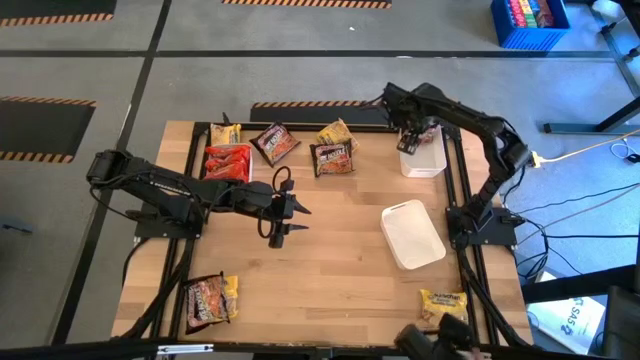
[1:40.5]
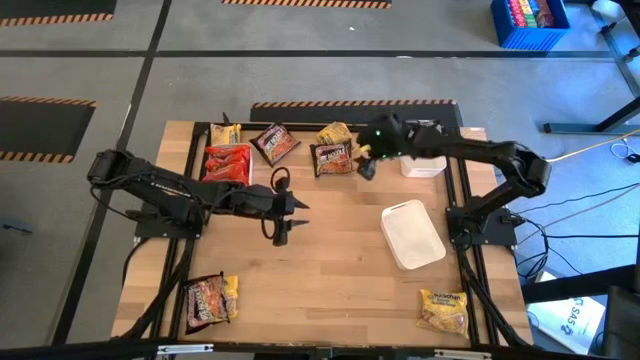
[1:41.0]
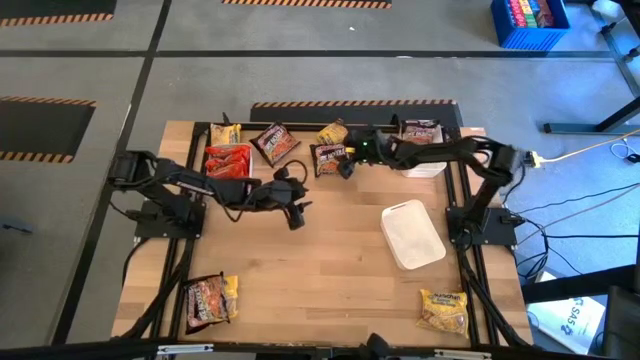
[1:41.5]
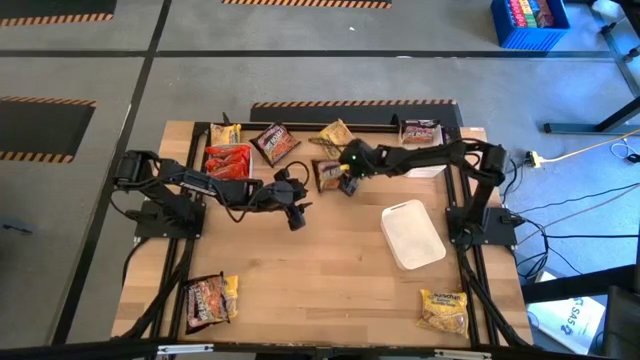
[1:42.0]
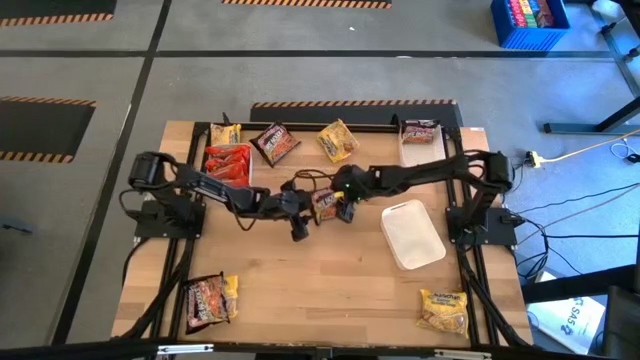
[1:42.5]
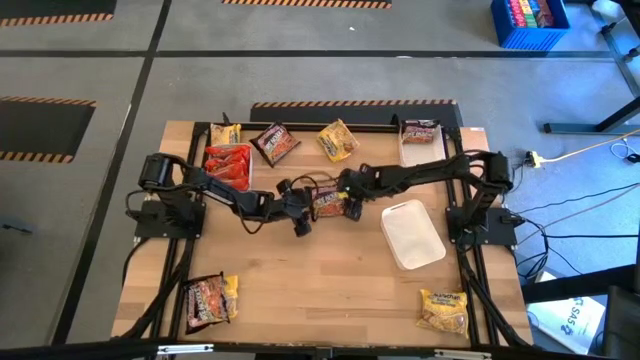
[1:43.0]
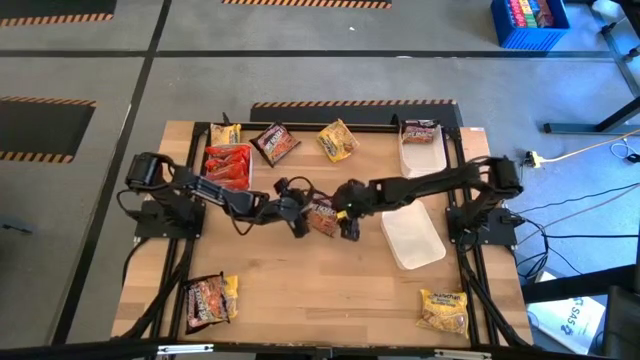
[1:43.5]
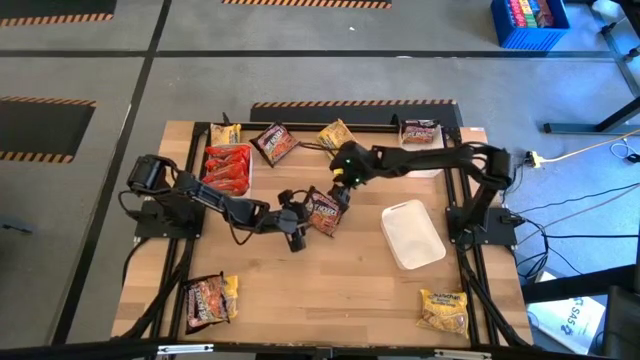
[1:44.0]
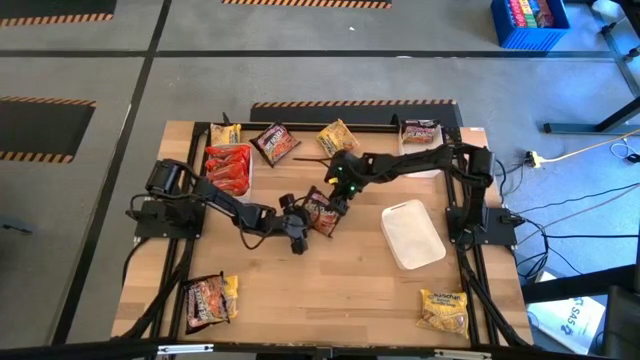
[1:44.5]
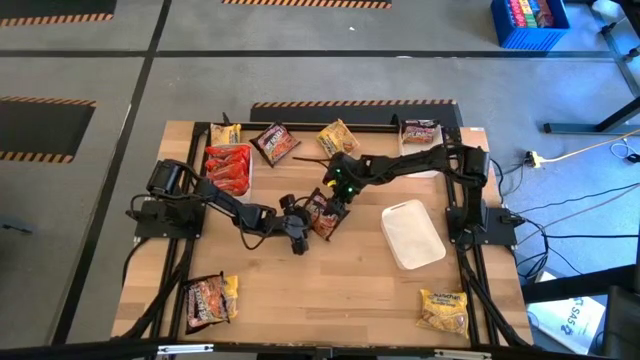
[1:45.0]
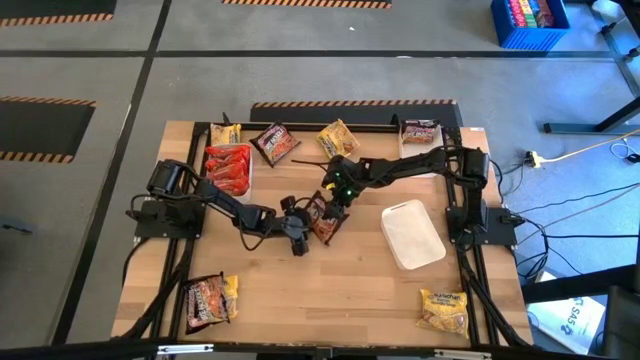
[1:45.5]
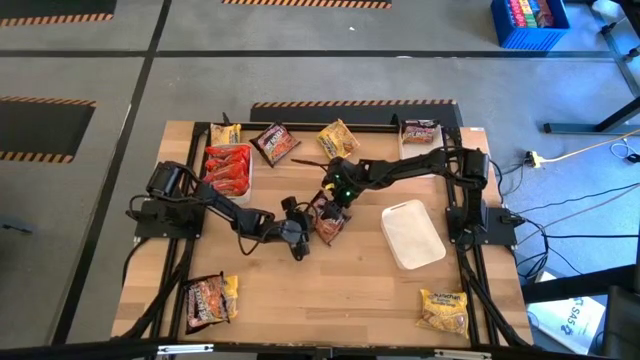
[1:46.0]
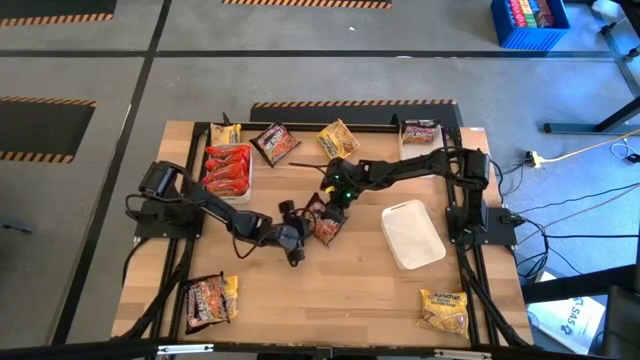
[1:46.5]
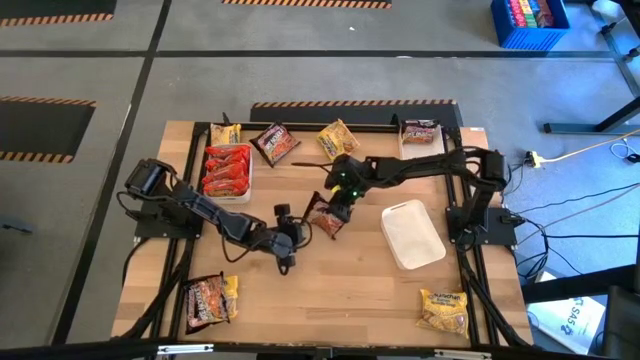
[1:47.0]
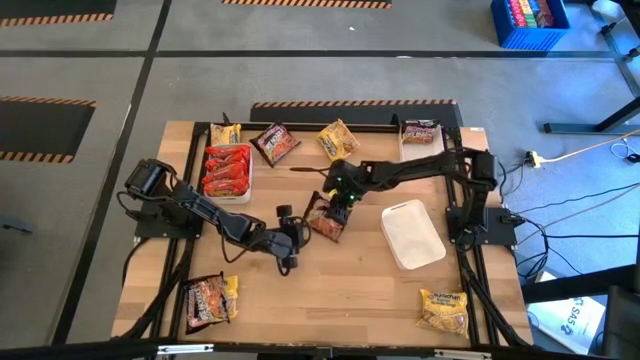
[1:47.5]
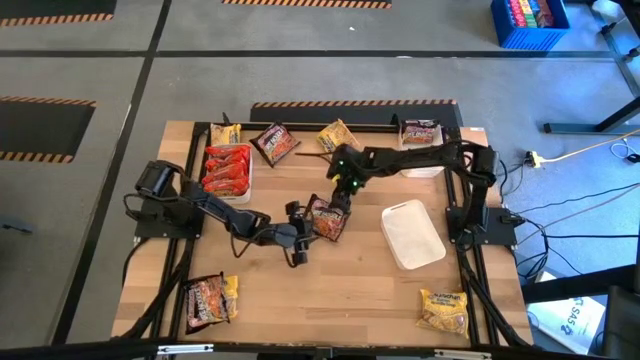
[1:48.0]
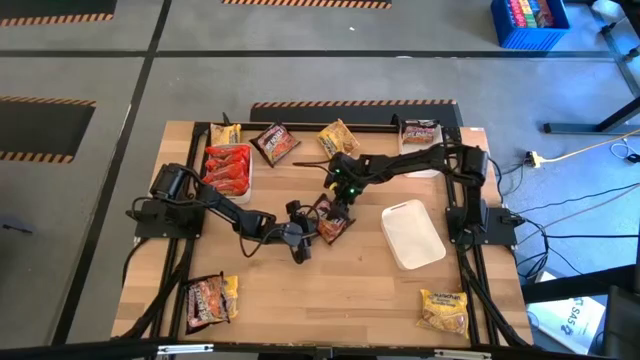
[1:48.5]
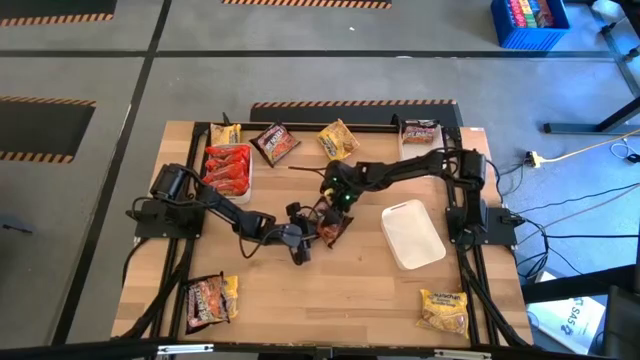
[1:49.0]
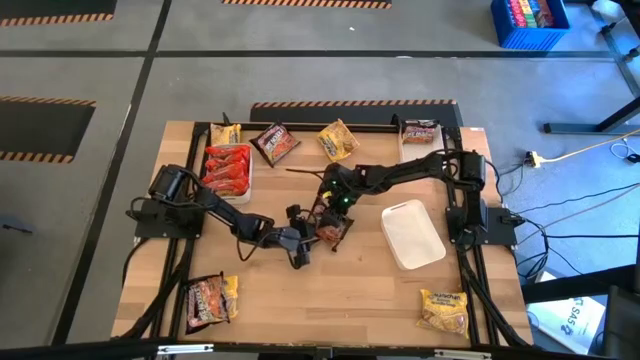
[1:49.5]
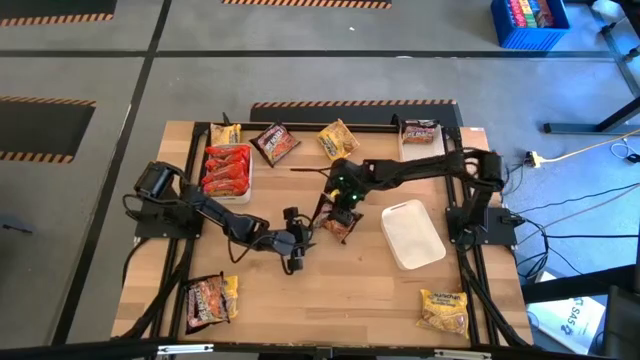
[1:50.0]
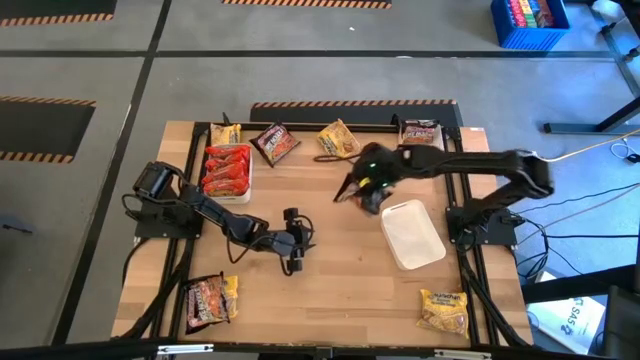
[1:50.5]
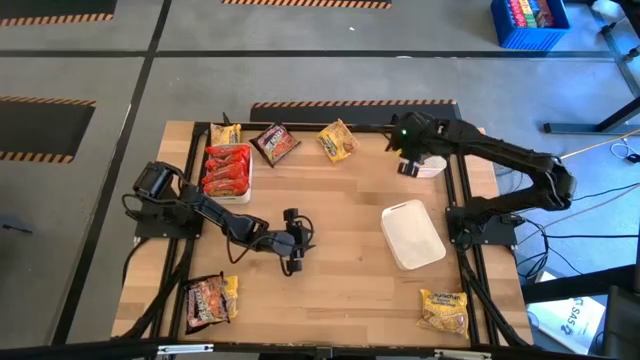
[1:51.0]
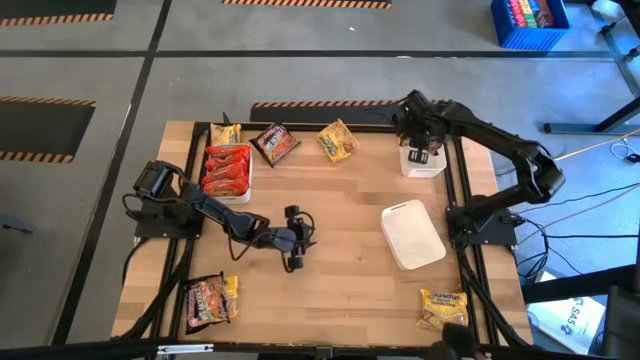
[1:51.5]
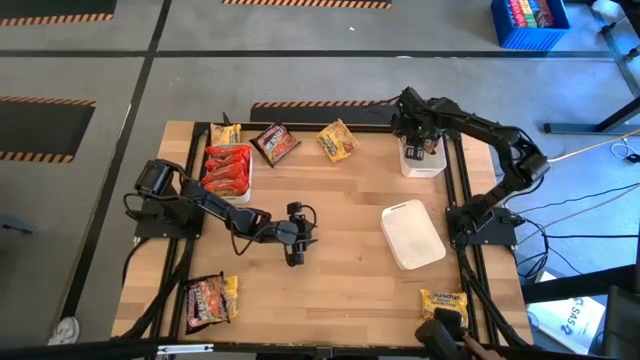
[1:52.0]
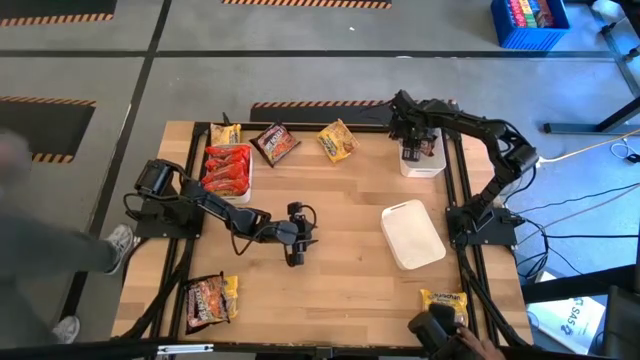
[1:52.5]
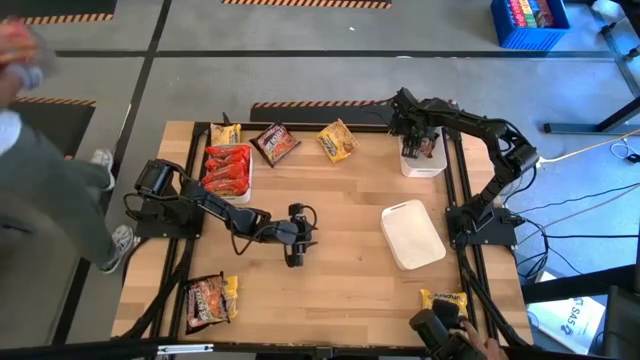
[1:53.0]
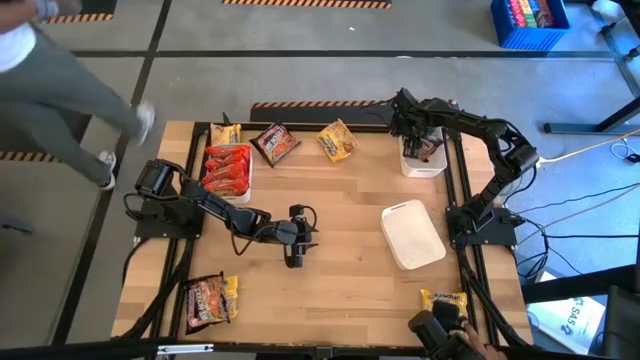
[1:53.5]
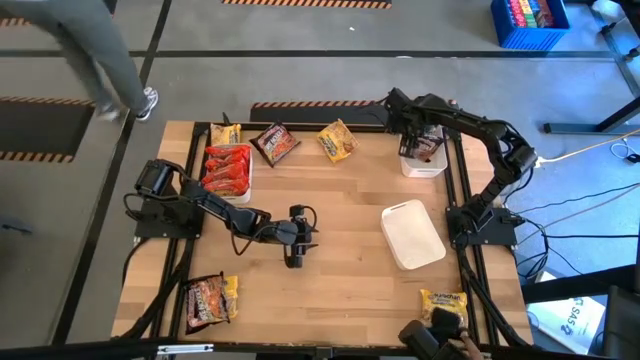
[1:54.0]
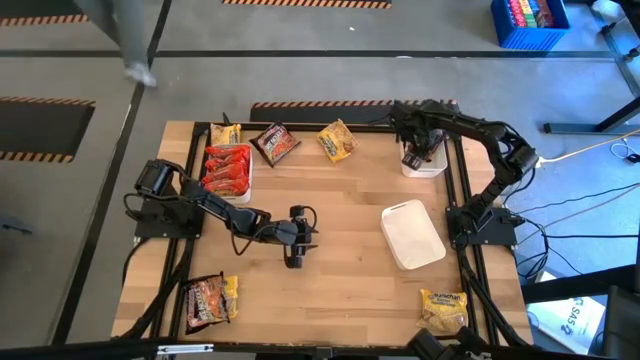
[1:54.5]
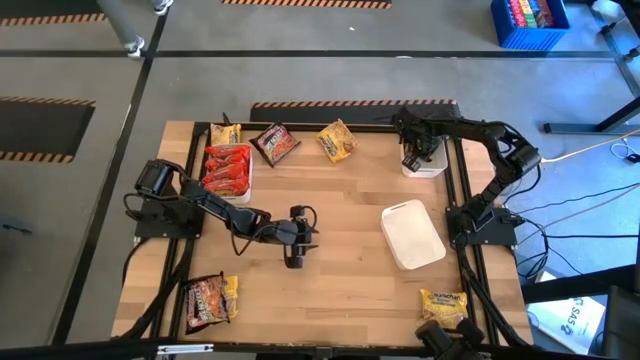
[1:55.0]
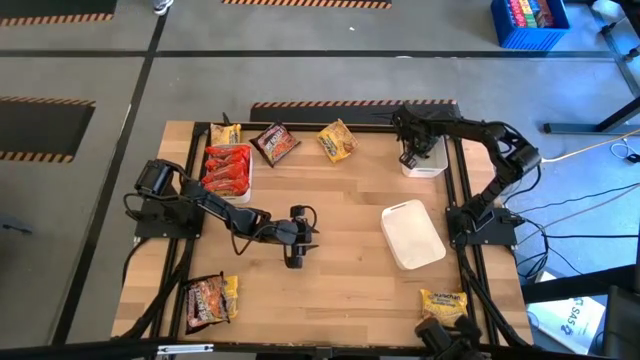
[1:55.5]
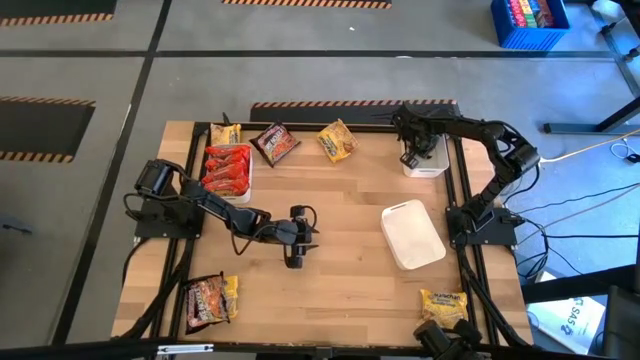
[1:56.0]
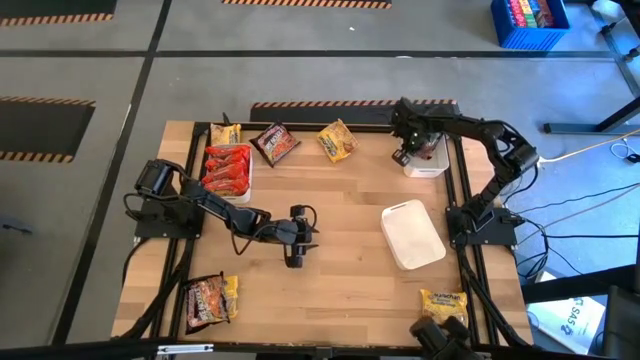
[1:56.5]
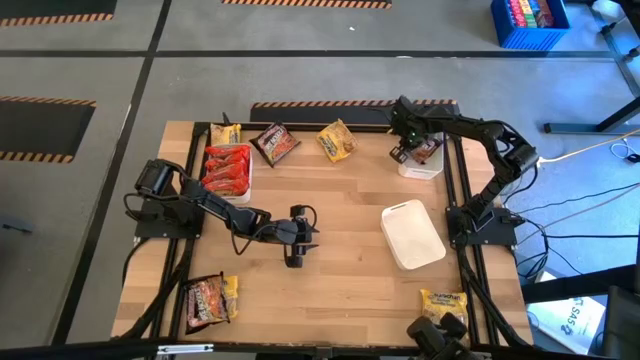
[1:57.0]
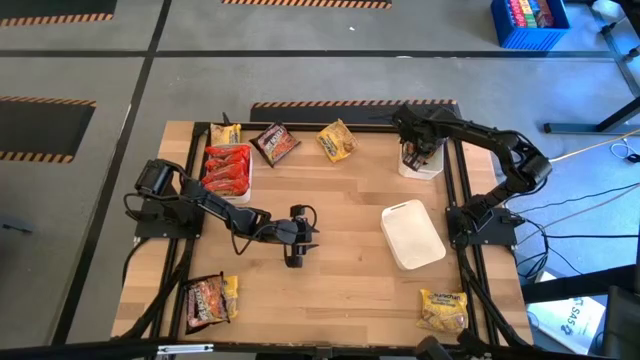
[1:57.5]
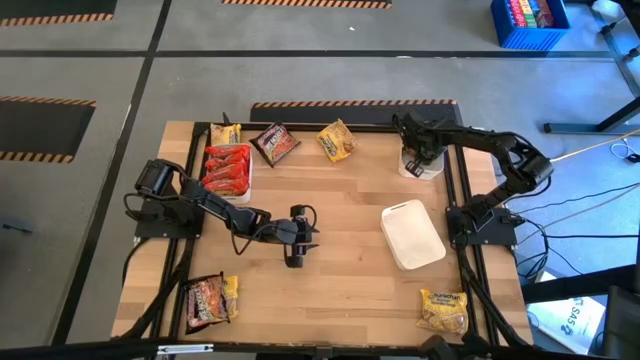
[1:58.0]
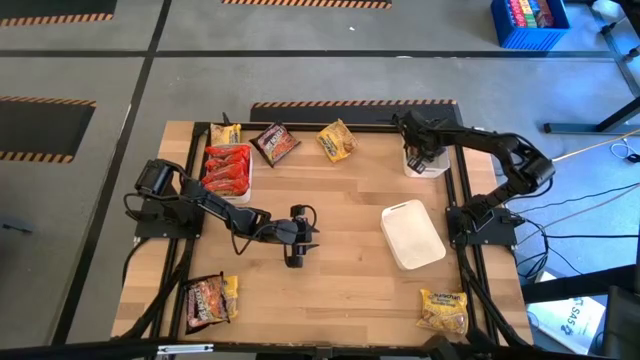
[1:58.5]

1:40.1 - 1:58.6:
Task: Sort Maruchan noodles
Put the top right black noodle into the top right white bin

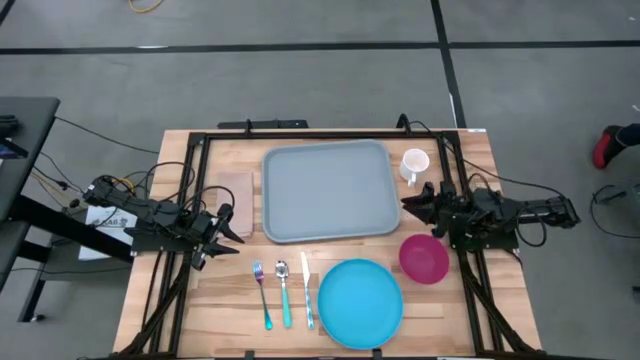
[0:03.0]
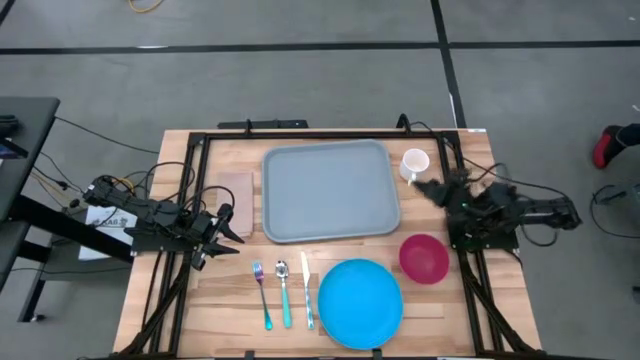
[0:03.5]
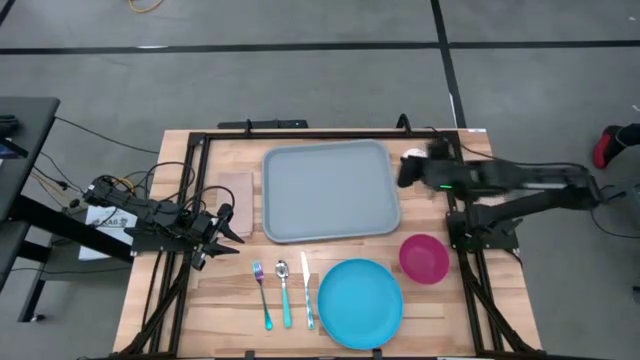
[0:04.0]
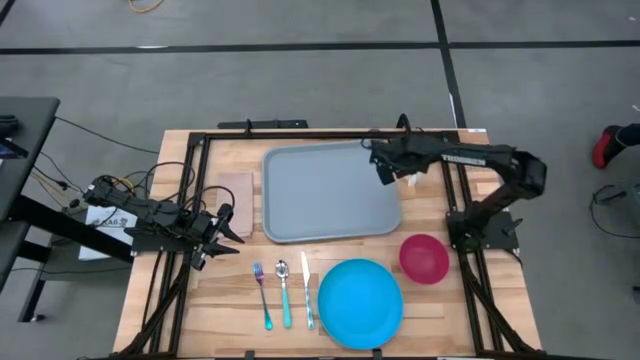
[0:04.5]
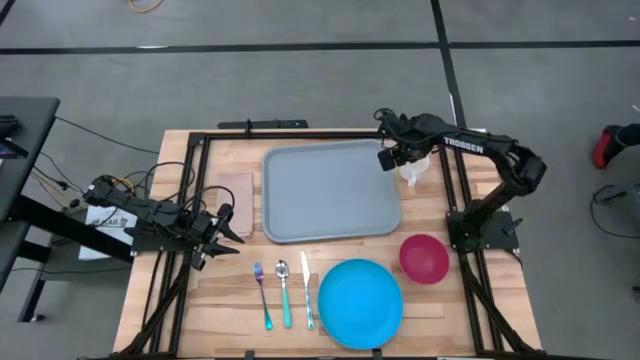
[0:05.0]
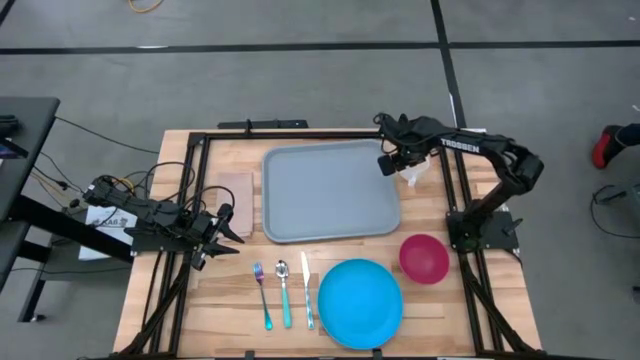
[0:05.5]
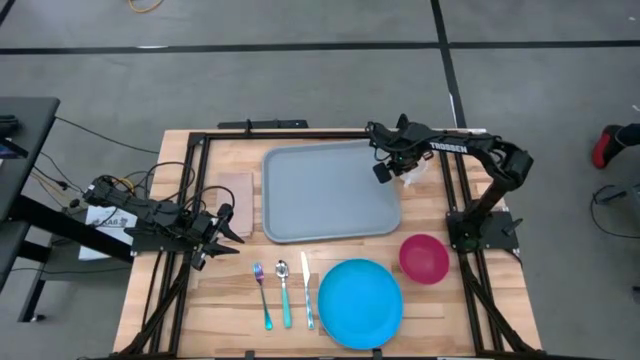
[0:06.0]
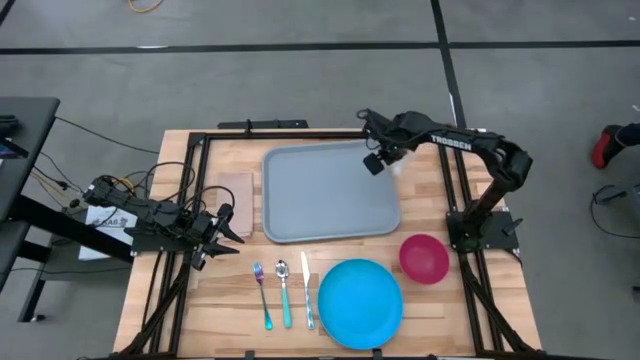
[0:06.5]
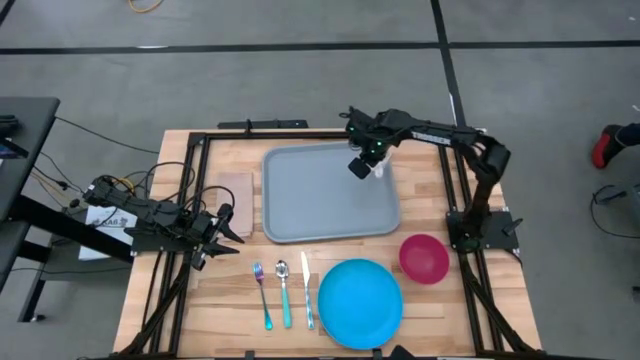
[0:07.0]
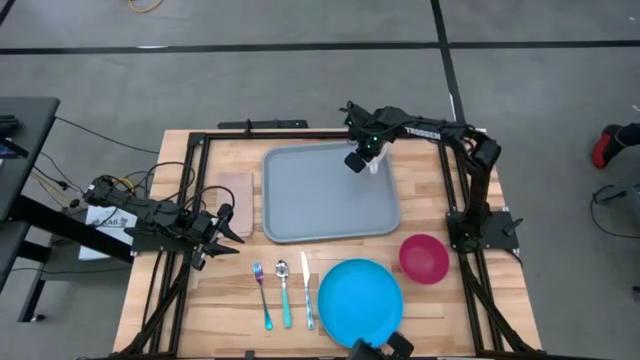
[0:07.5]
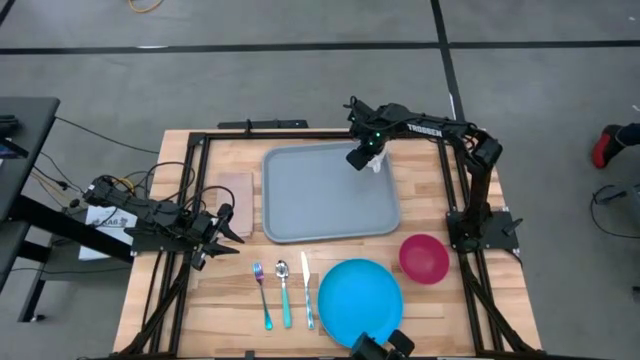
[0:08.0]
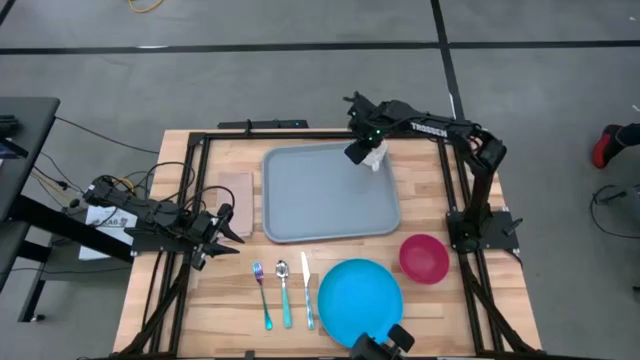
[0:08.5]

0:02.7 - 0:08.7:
Task: Set up tray
Put the white mug on the top right of the blue tray
